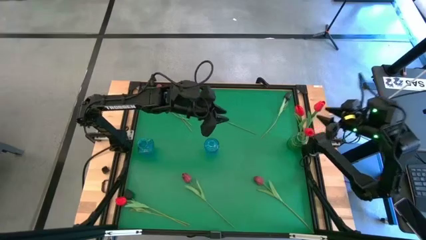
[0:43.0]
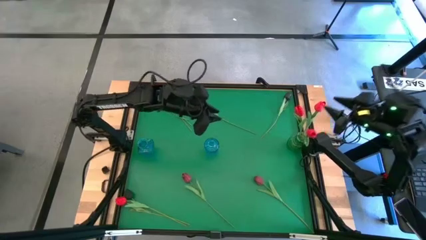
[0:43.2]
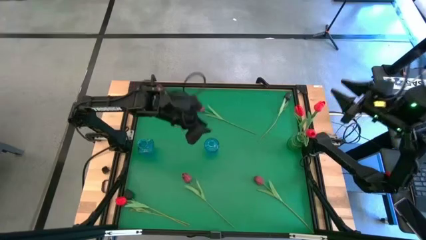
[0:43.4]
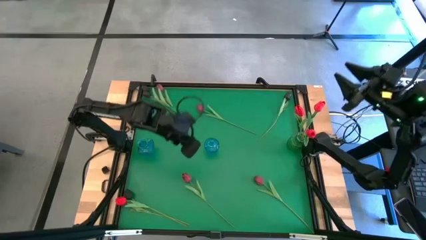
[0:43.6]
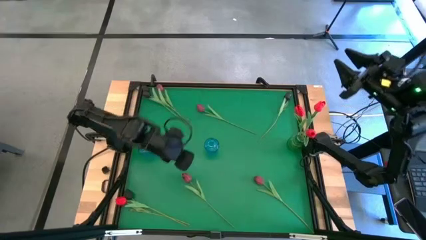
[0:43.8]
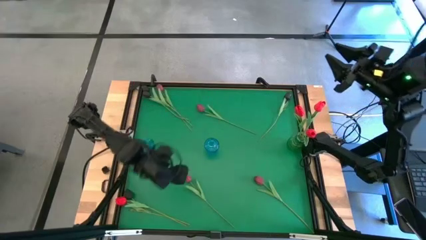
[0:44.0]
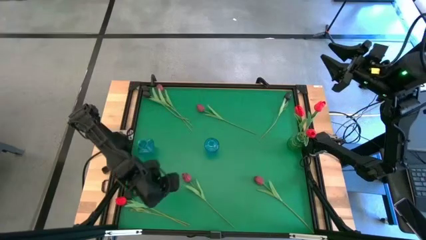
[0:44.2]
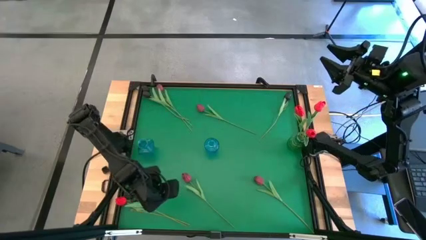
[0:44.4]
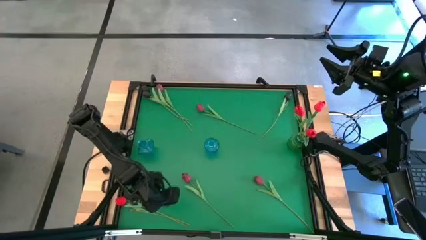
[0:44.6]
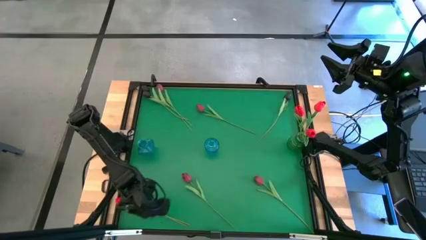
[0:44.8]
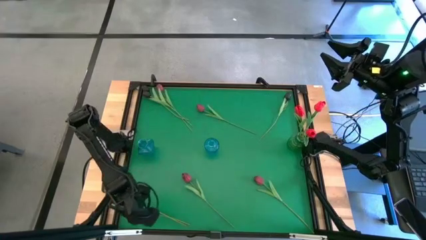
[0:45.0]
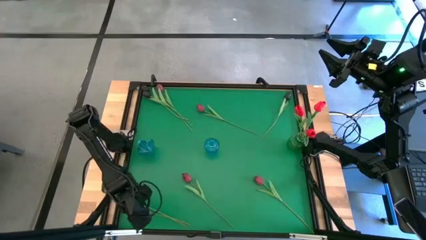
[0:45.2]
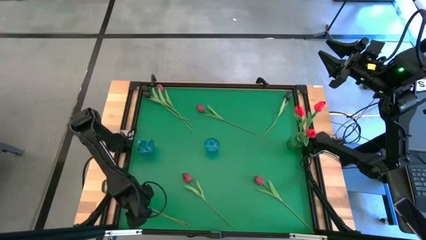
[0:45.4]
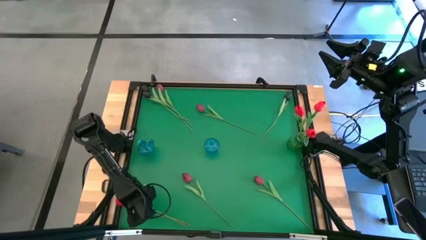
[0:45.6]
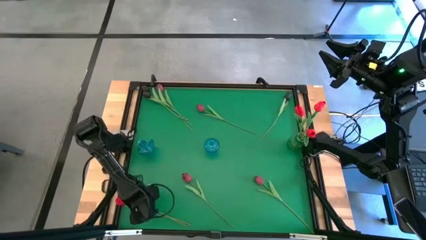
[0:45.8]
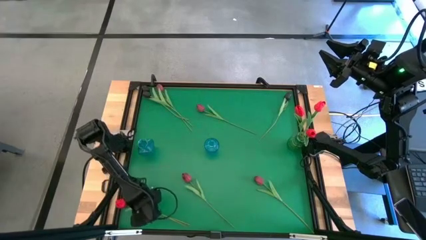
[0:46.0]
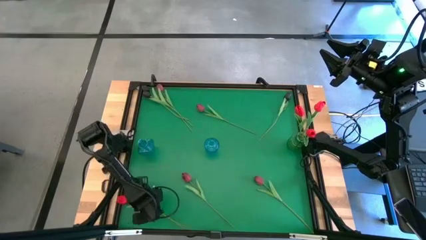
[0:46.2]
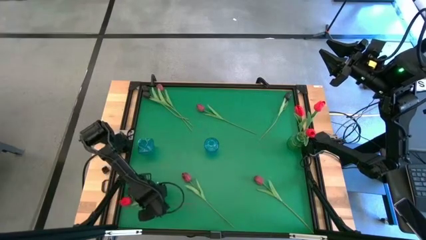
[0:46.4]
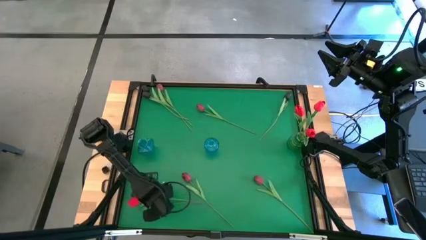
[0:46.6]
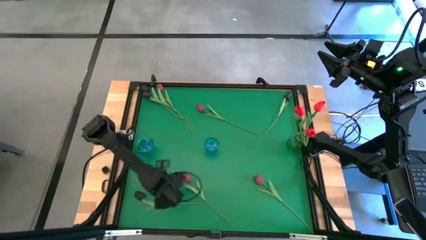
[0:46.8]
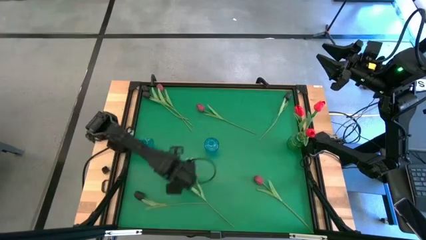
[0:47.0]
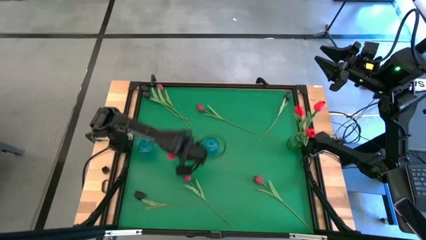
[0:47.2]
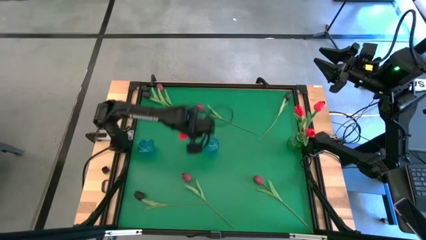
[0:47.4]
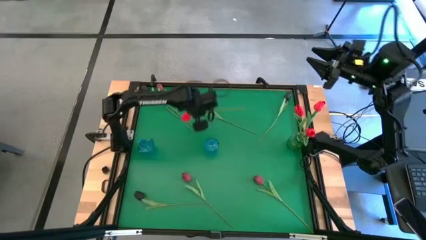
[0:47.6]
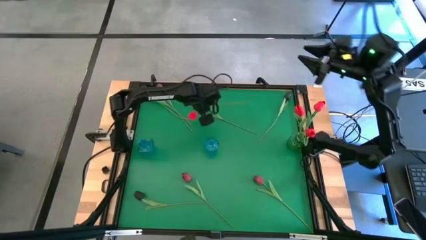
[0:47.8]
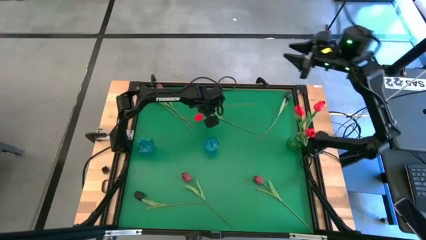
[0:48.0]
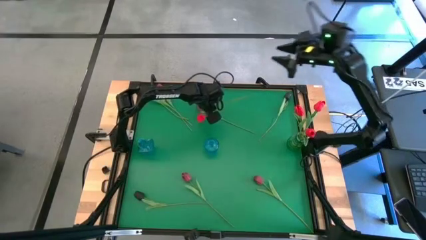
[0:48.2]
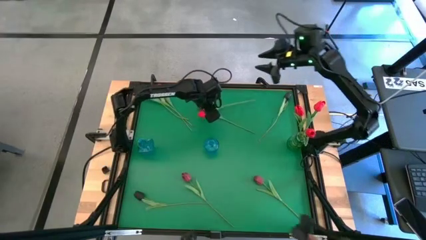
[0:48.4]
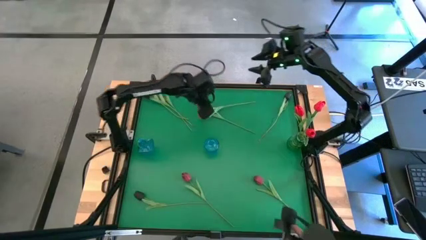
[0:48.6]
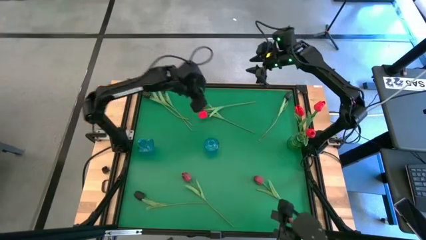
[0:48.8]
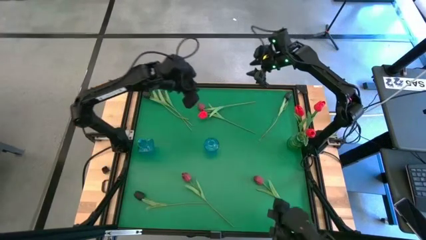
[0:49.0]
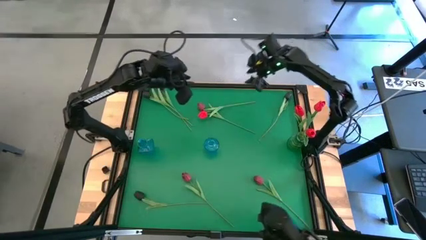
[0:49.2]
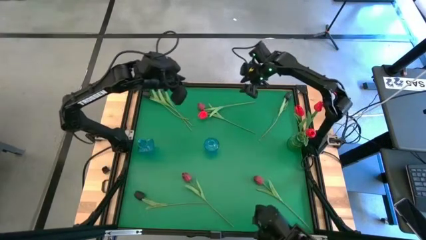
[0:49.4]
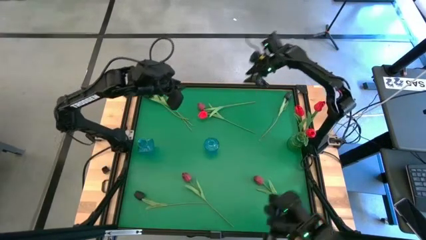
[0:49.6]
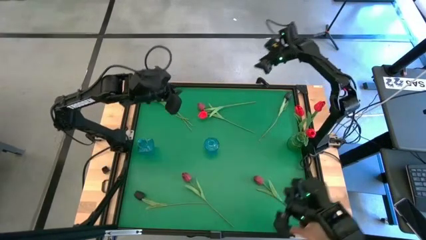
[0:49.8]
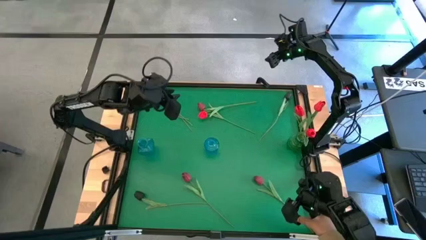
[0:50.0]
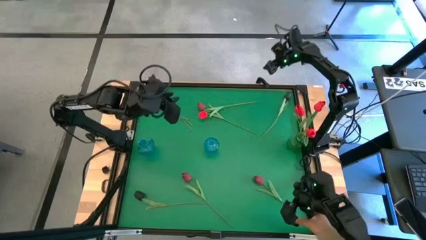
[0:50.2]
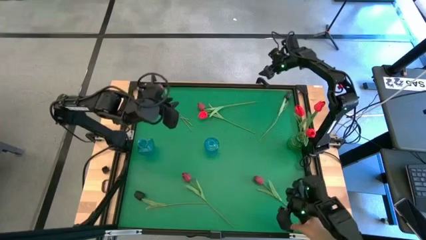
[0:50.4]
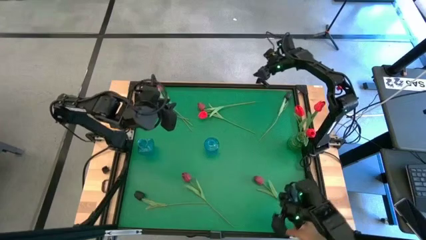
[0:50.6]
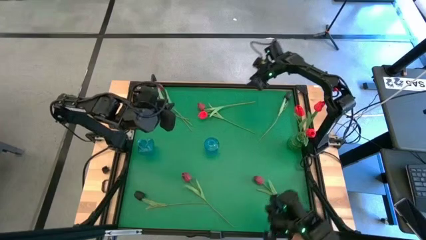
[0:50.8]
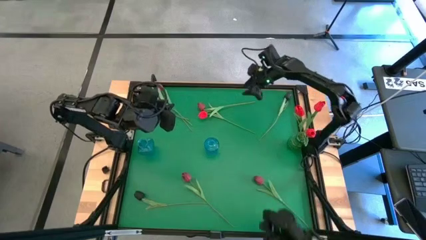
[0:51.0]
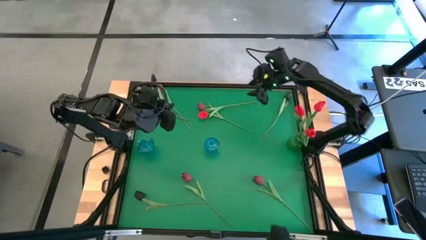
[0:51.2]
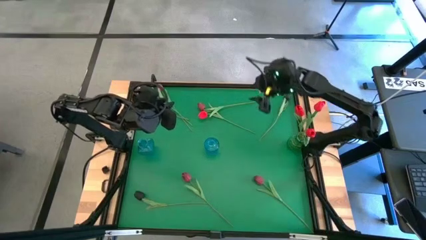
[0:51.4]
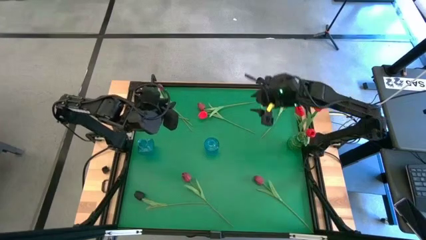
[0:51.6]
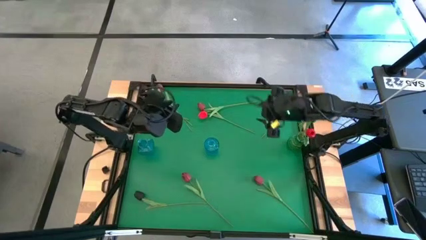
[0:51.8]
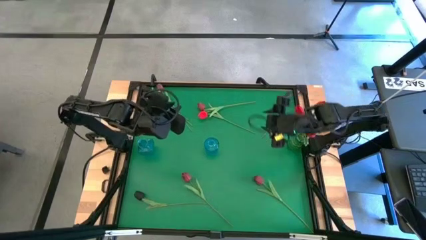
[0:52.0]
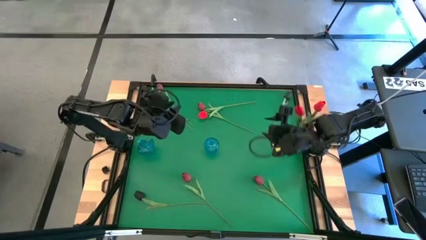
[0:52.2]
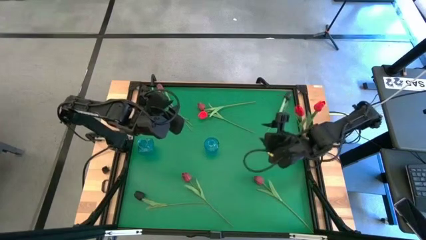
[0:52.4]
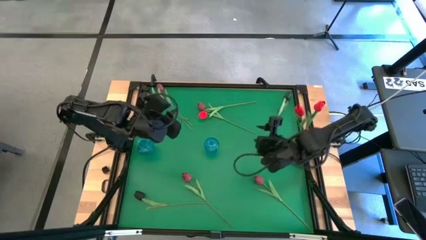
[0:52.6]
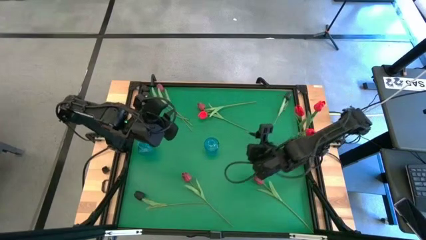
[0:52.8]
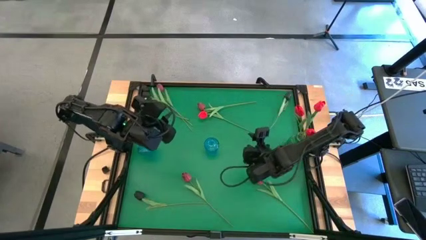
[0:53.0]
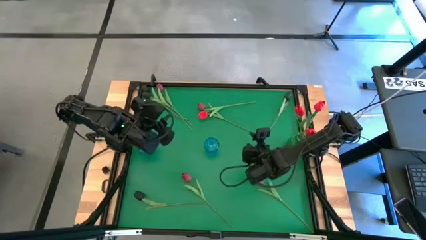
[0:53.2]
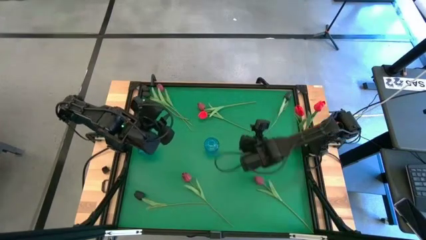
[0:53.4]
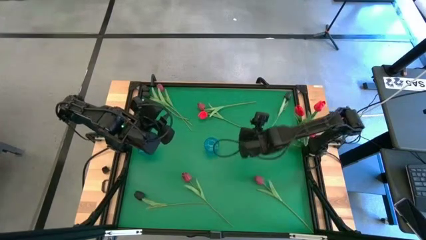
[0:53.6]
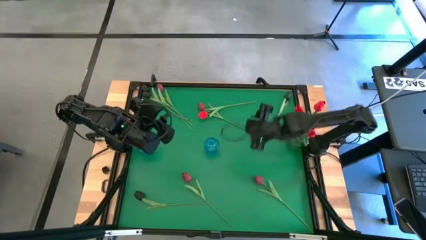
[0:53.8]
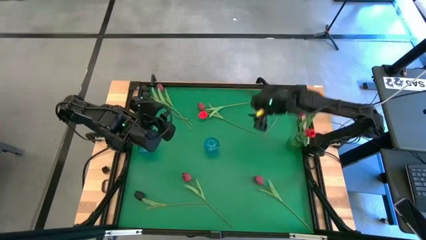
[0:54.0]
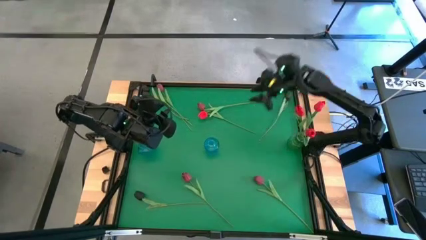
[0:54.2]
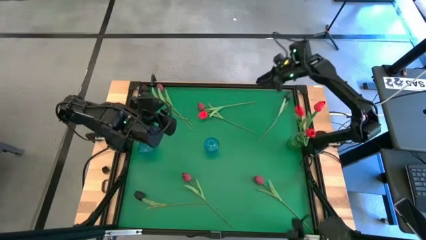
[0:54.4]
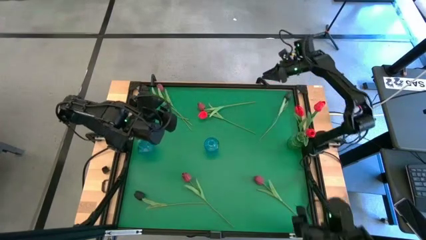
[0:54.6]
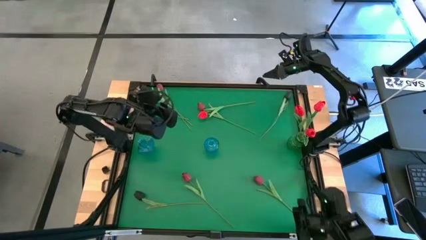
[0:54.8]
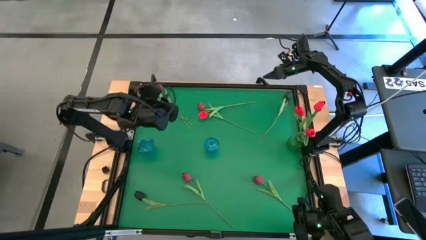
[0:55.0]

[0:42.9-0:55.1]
Task: Sort flowers into vase by color
Put the pink flower into the green flower vase

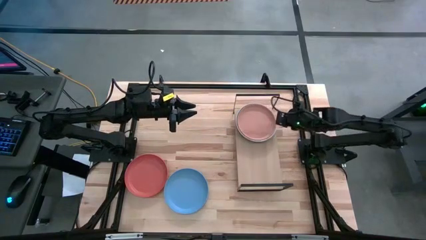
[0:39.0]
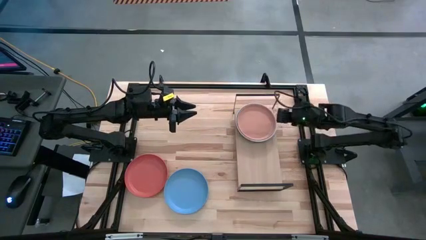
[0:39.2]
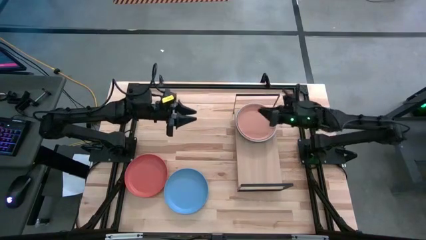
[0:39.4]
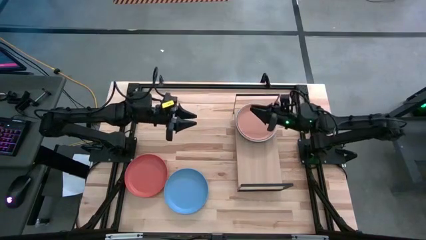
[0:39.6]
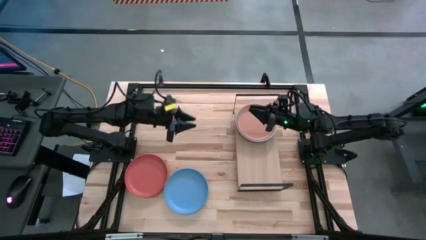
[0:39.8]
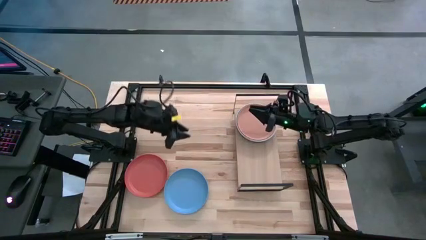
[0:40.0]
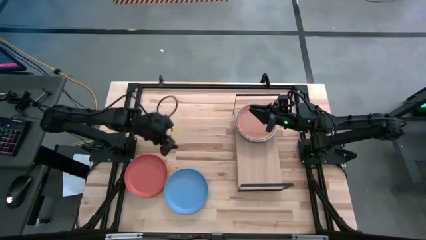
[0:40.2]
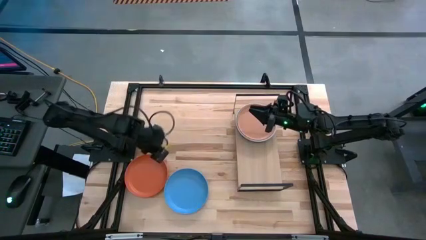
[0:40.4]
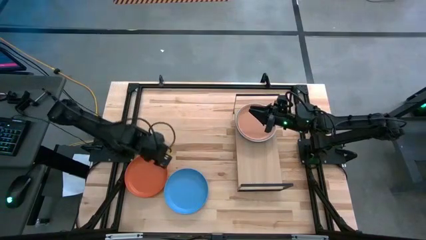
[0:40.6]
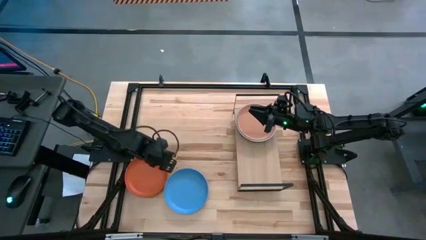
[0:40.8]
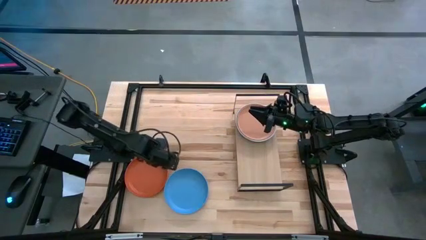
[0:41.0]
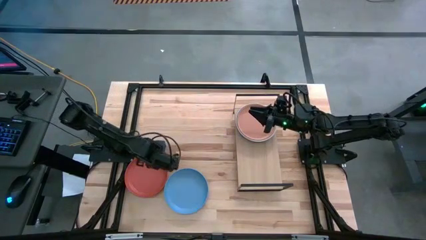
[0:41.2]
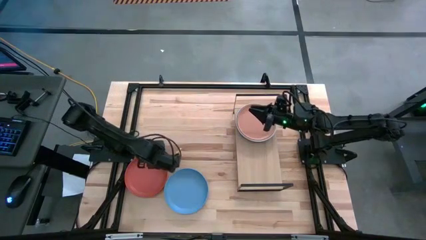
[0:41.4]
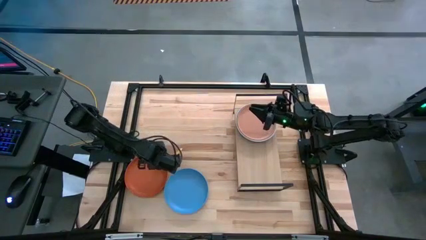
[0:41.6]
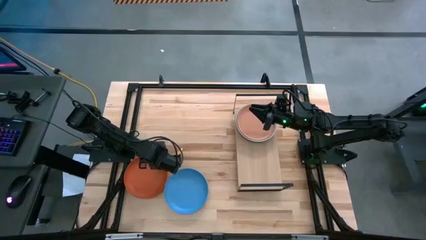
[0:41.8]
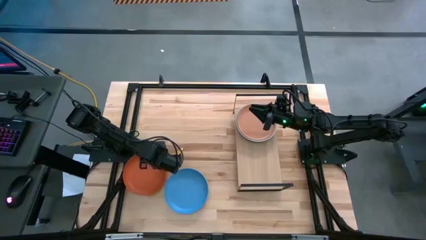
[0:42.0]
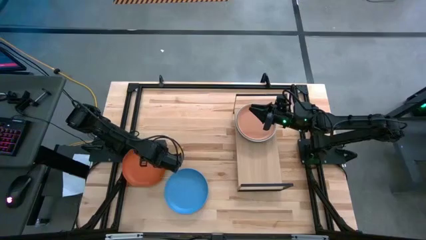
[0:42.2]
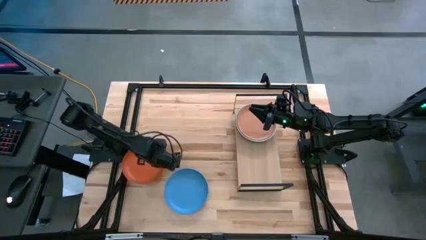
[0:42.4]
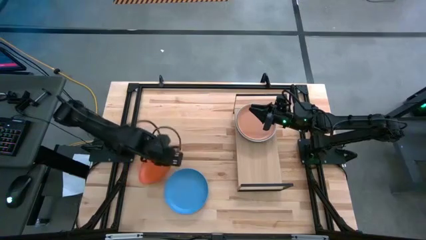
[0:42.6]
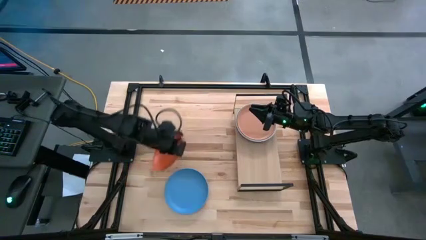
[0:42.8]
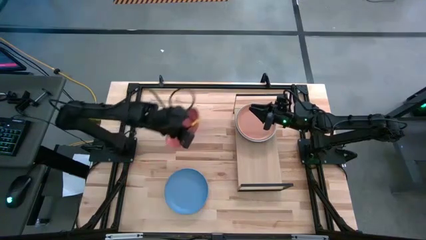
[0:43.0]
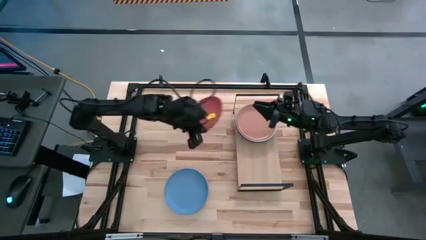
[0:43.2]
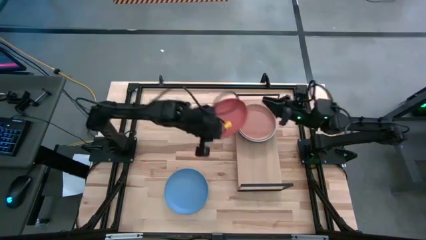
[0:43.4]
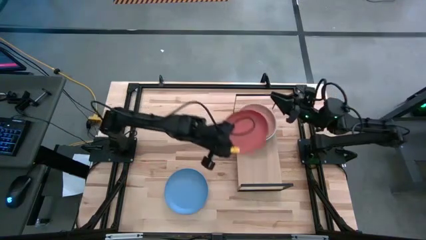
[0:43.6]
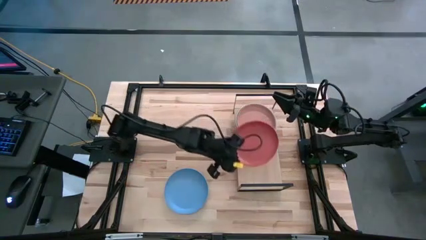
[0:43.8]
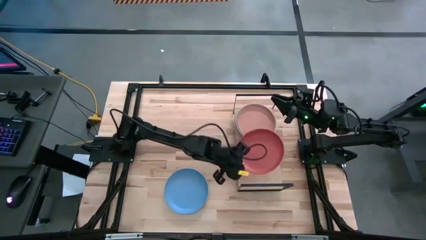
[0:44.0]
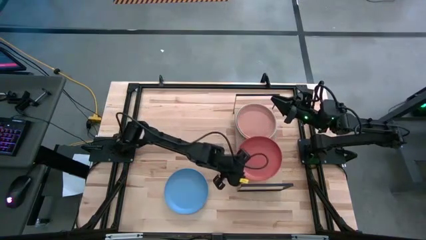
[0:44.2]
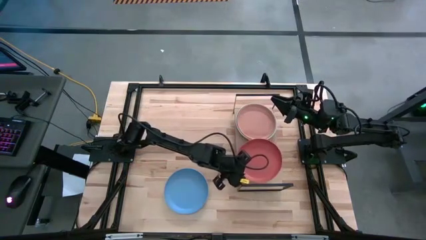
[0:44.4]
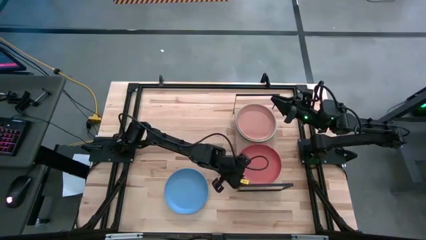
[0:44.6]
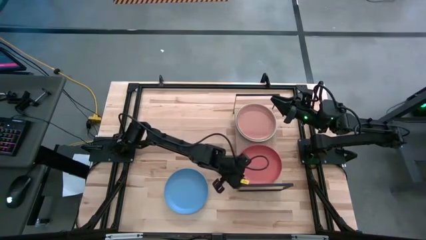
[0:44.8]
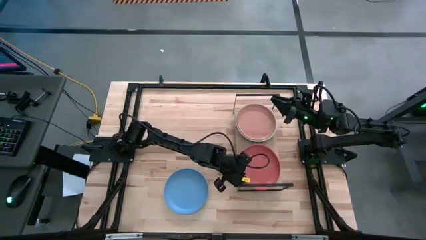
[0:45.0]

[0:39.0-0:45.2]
Task: Place and stack plates onto a shelf
Put the orange plate on the shelf
